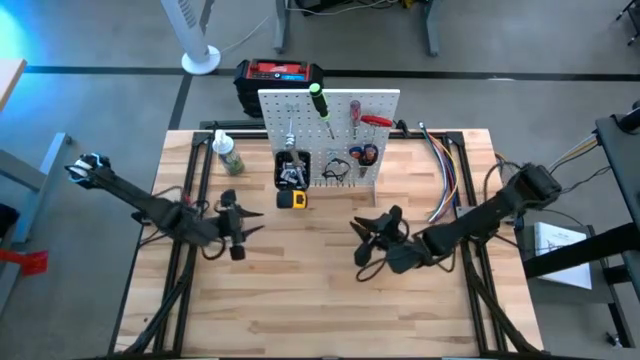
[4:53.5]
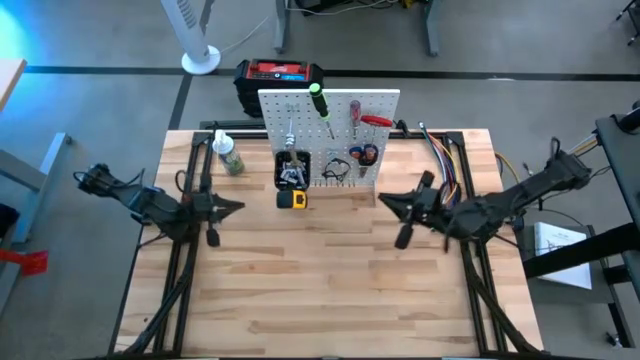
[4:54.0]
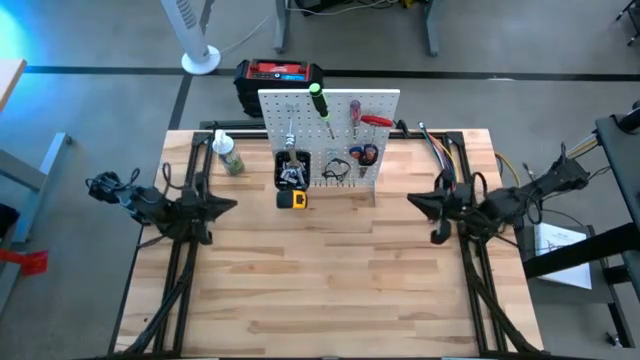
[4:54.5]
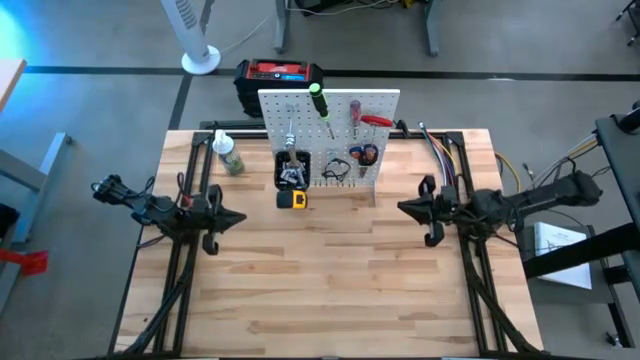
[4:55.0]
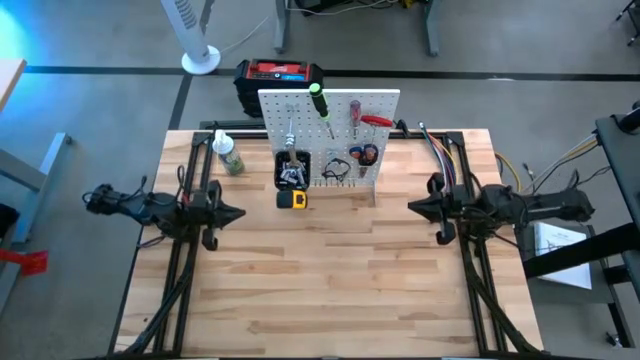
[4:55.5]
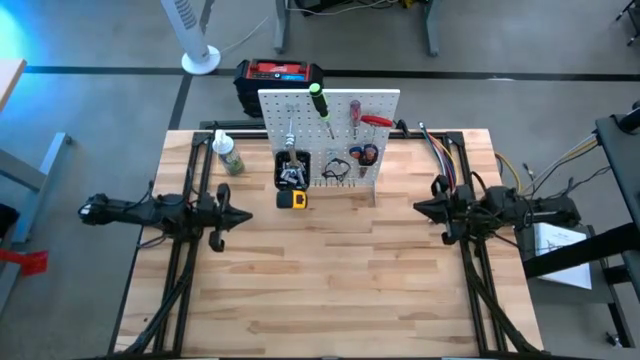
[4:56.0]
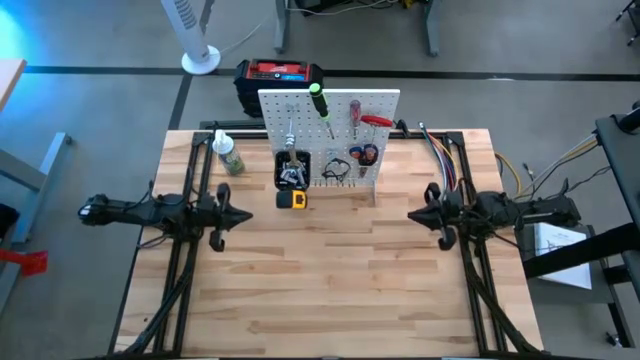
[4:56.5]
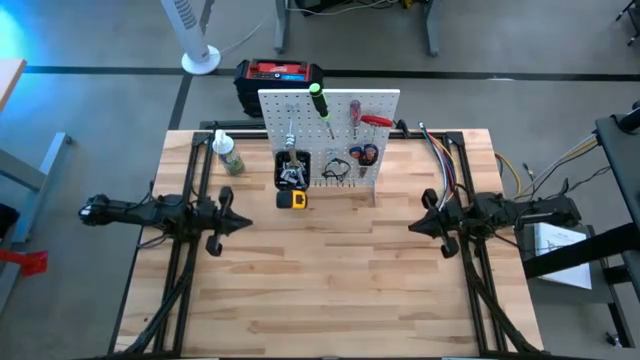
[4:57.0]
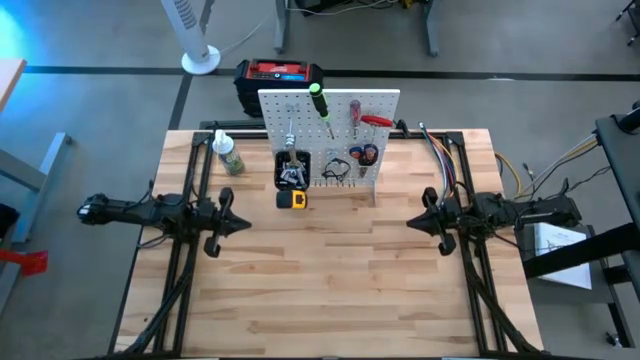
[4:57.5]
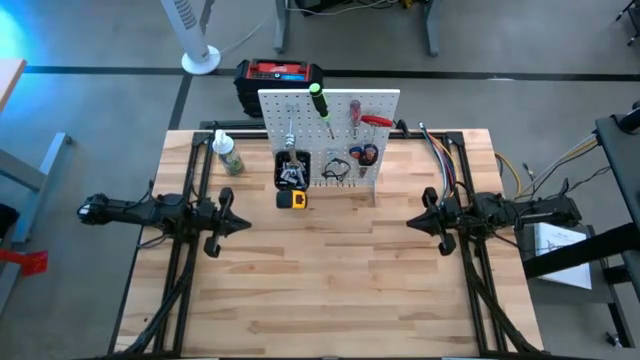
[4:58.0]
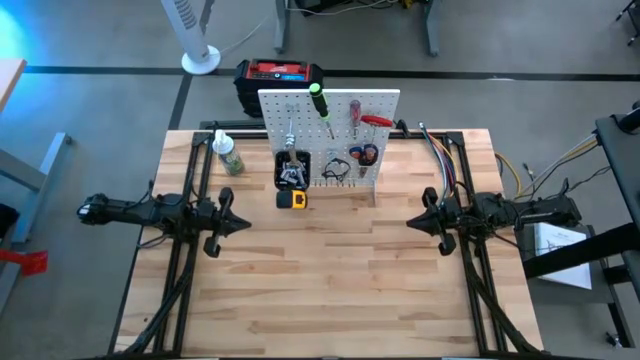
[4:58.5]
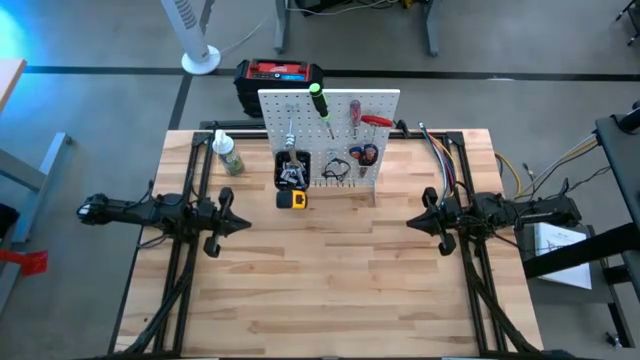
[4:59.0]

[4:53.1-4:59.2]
Task: Hang tools onto peg board
Return to Home Position

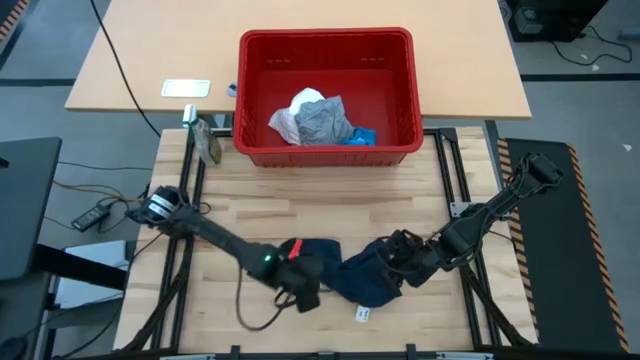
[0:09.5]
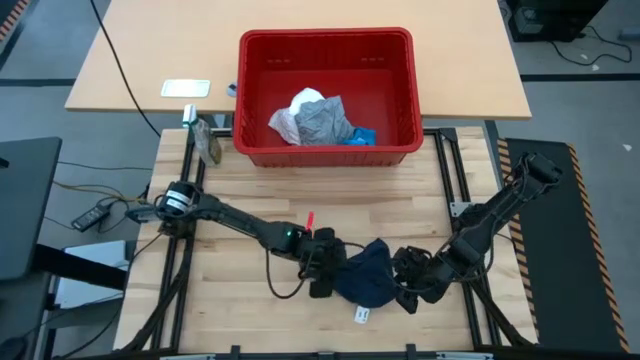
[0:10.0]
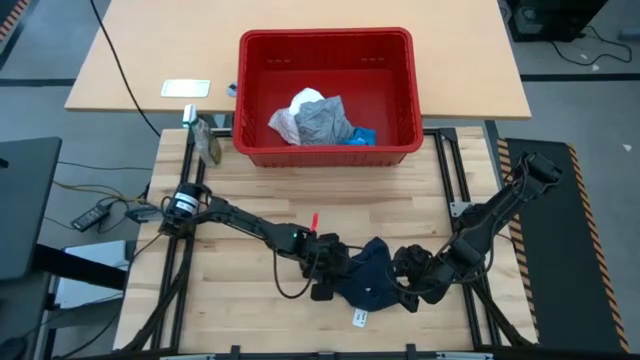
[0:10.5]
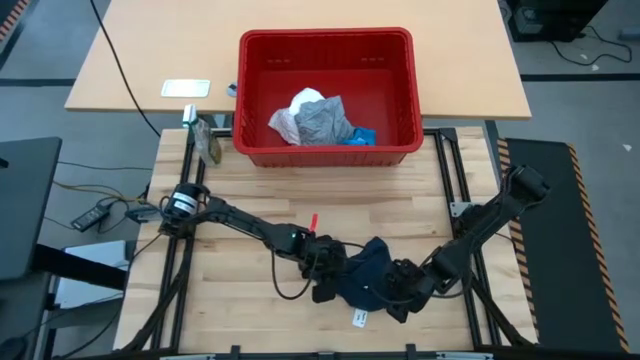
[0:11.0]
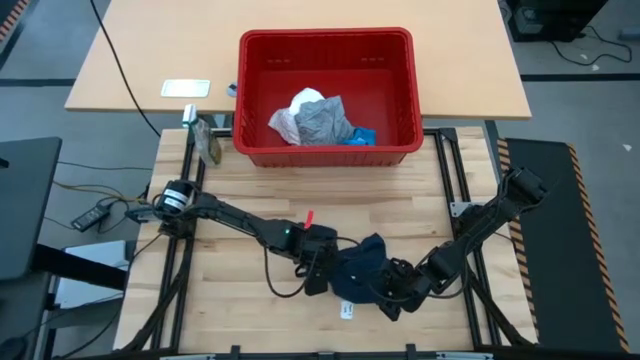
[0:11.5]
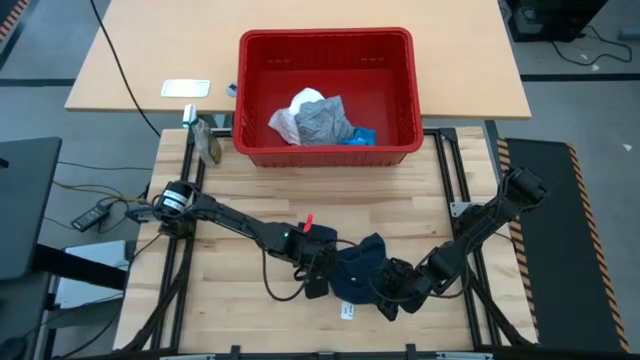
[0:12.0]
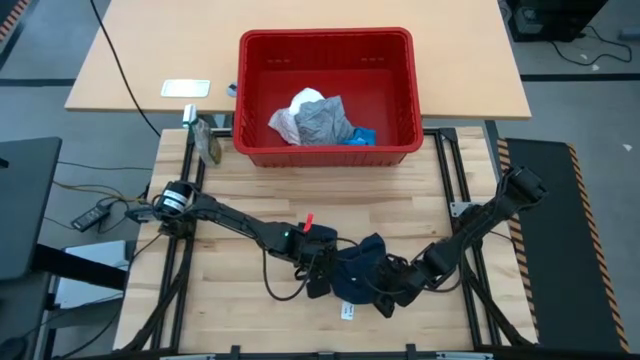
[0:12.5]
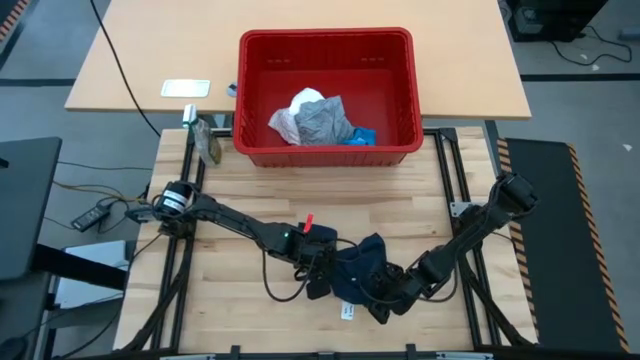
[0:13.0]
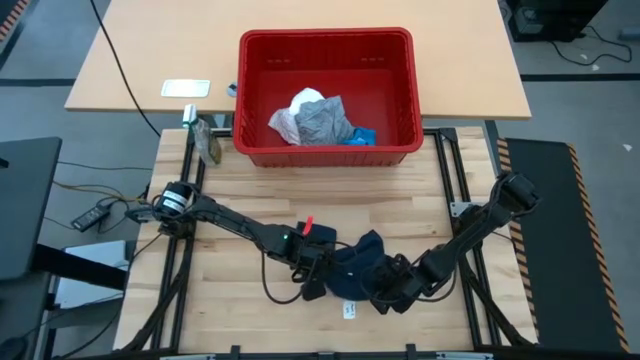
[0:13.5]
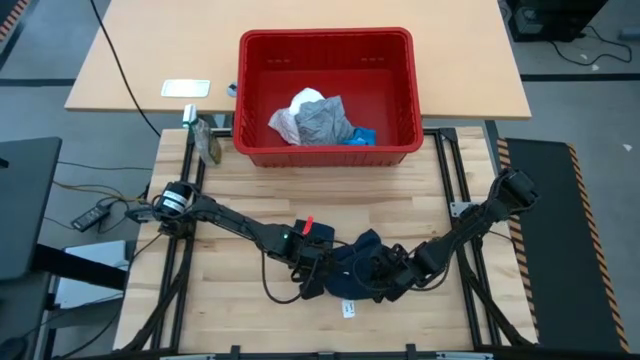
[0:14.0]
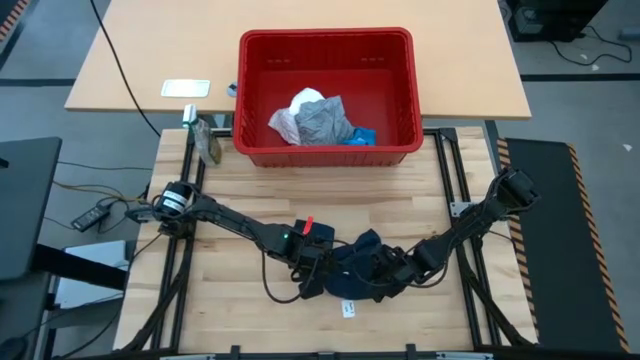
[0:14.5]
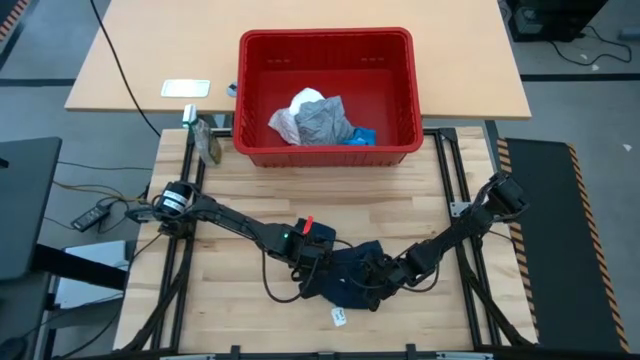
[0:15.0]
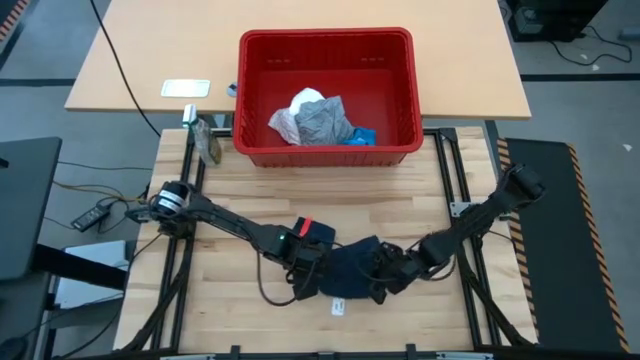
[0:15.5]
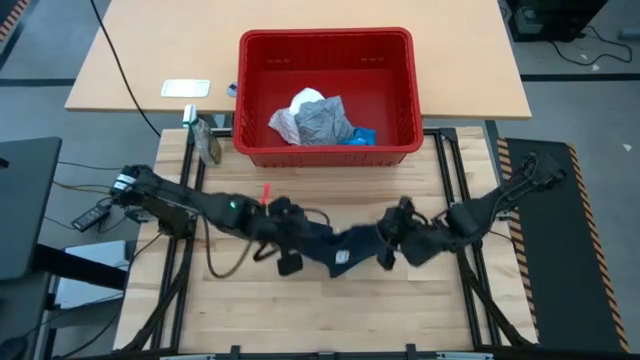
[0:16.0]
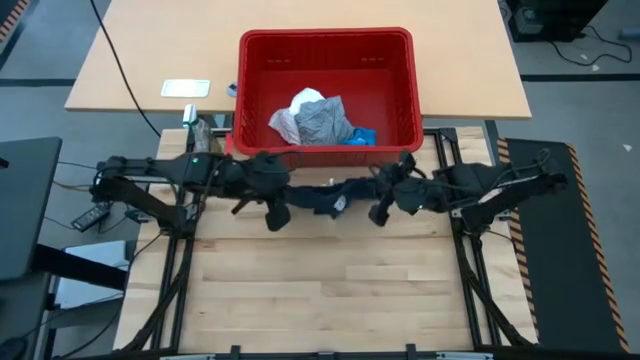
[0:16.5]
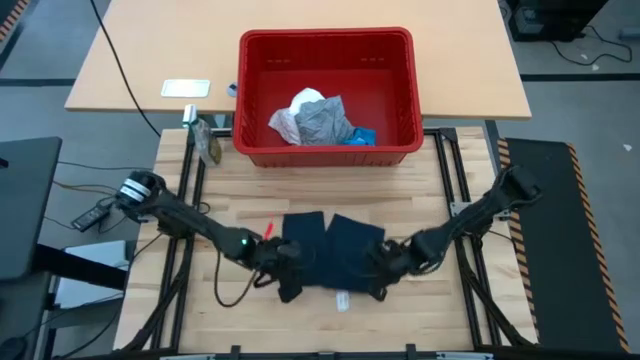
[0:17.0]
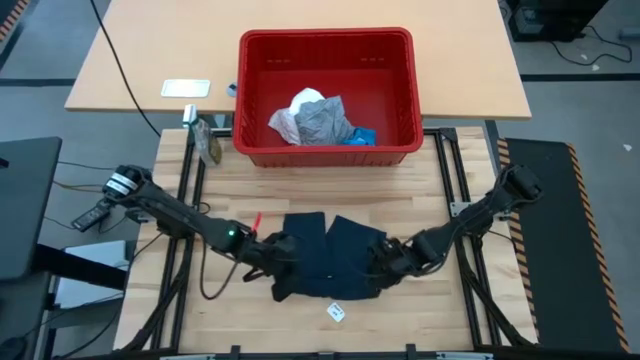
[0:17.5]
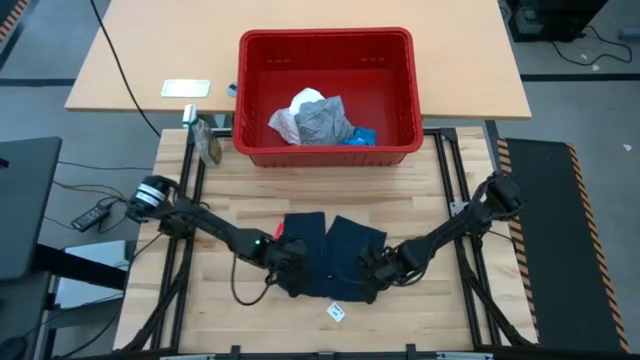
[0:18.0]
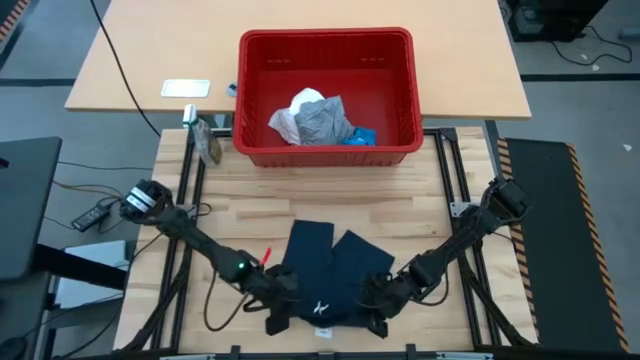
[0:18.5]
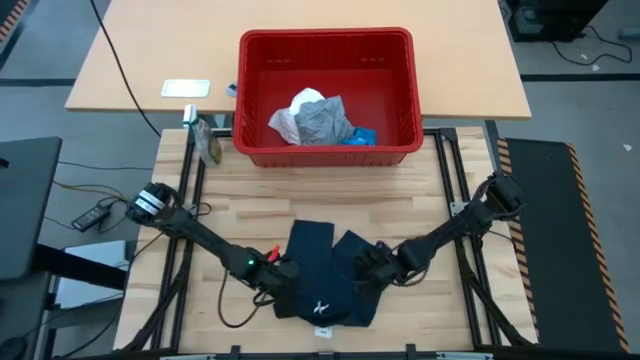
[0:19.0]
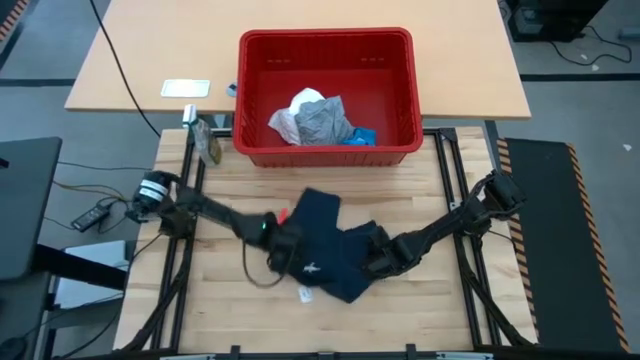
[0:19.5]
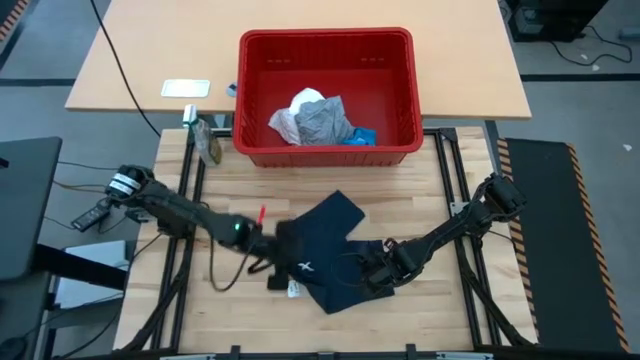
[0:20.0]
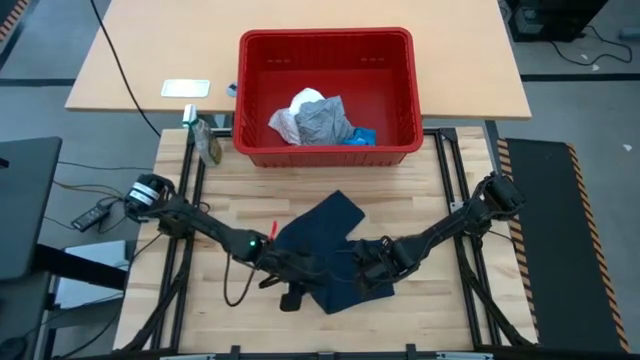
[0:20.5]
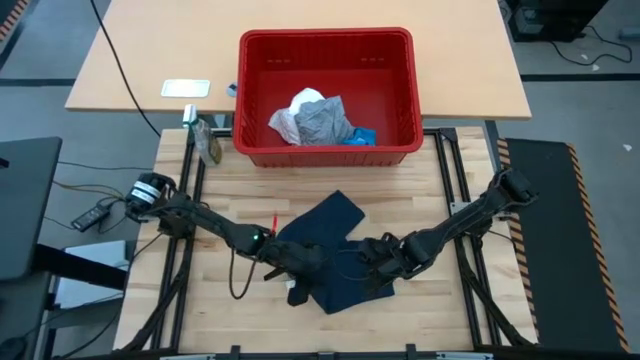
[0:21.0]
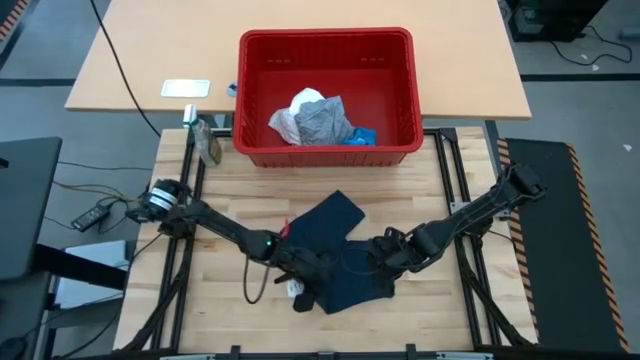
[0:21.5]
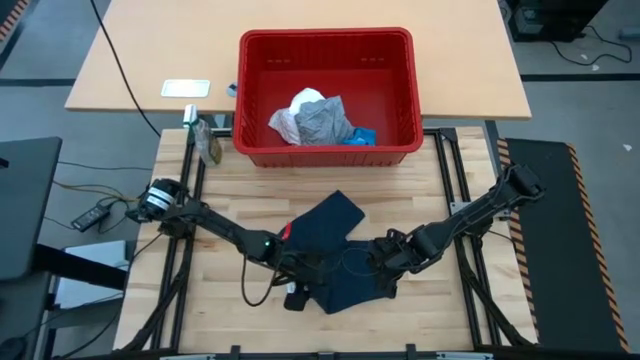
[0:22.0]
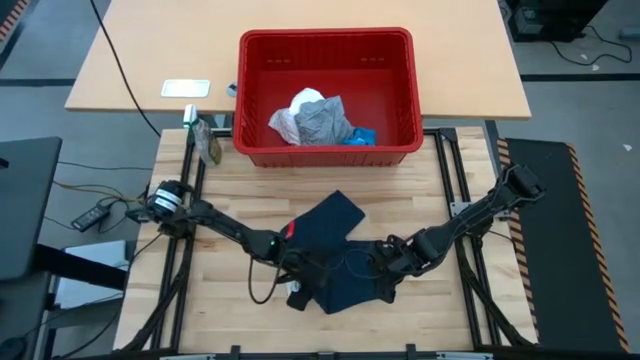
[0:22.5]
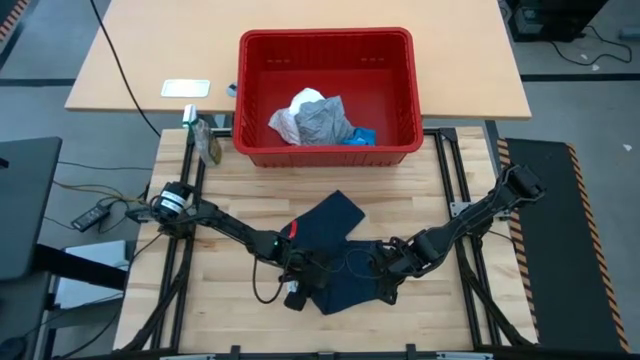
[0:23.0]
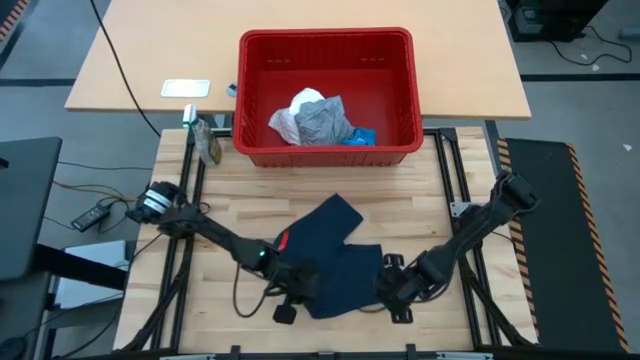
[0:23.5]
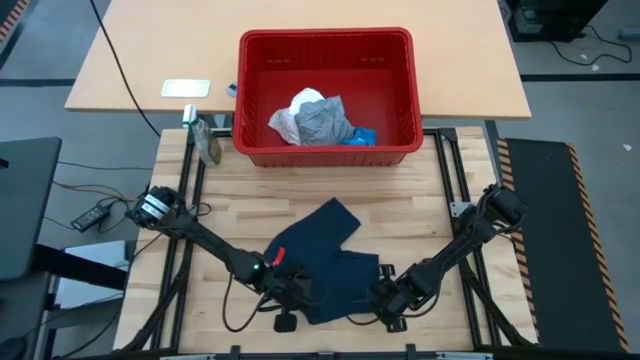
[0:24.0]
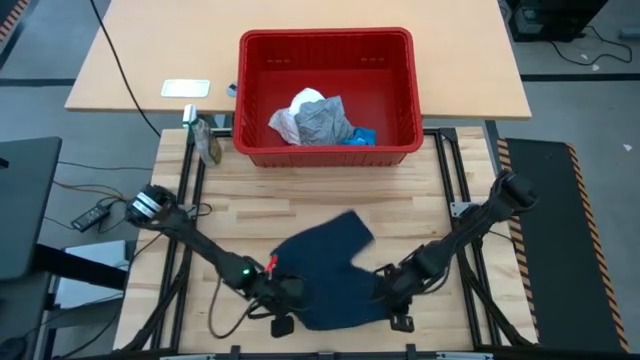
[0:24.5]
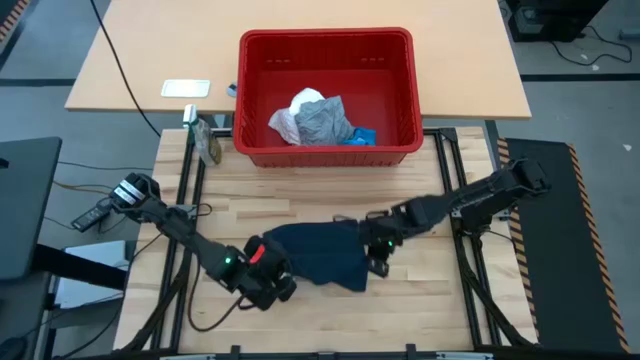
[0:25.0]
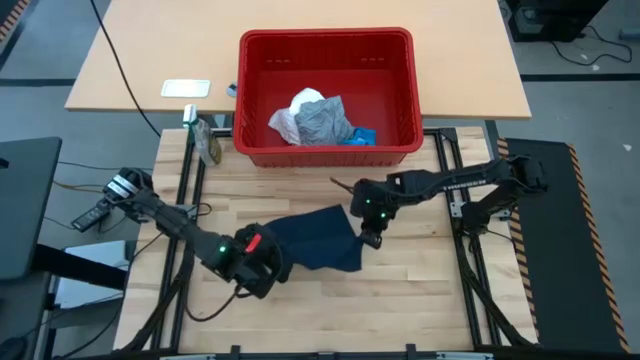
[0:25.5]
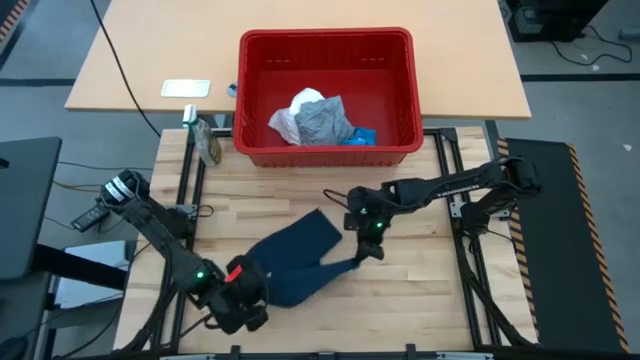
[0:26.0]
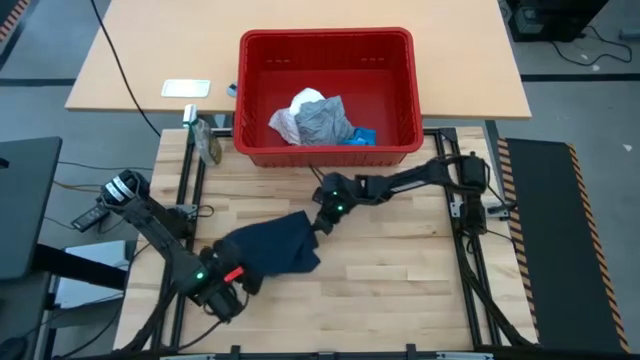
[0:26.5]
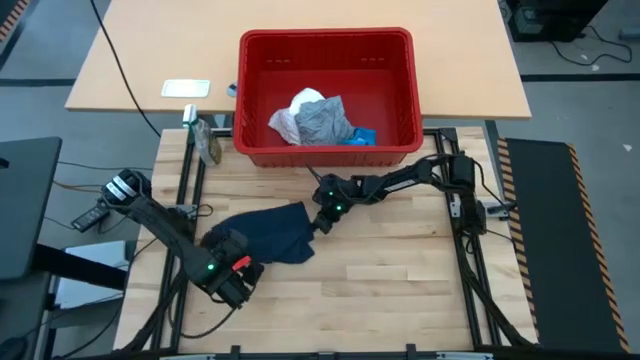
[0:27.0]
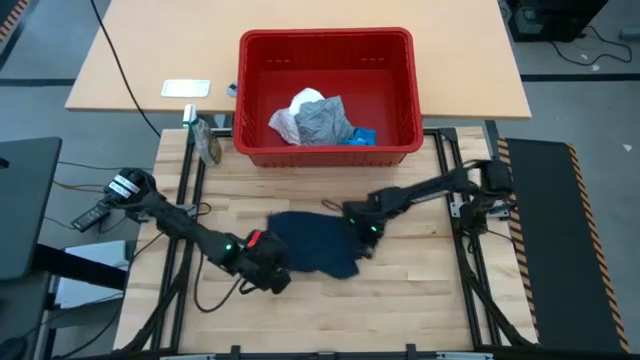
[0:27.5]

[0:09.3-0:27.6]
Task: Fold laundry
Fold the dark blue shorts
